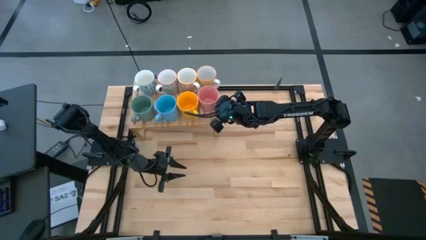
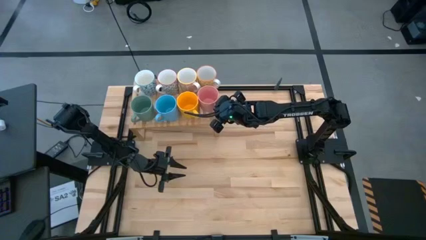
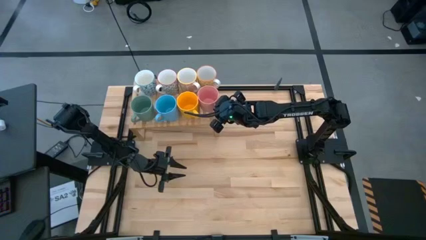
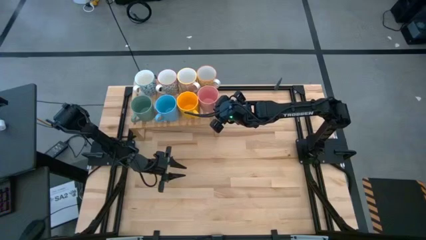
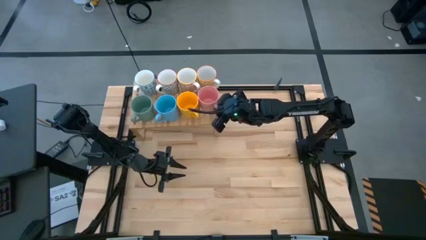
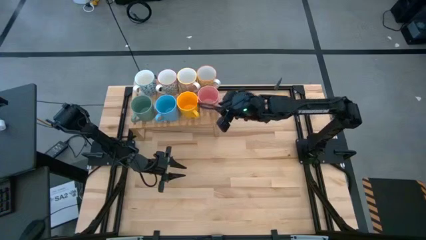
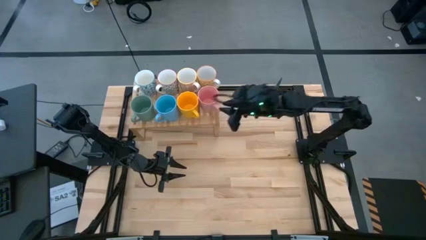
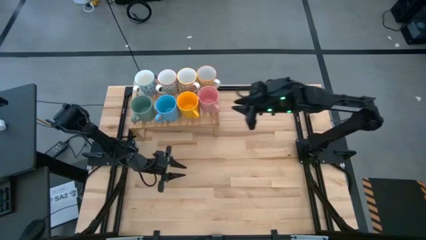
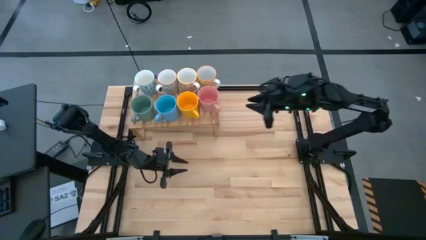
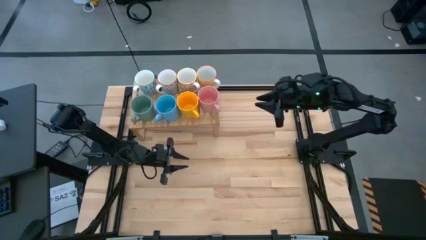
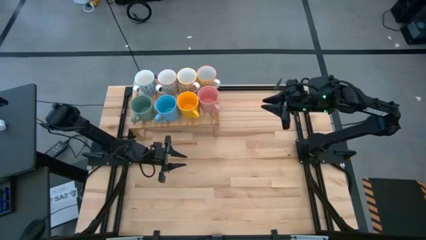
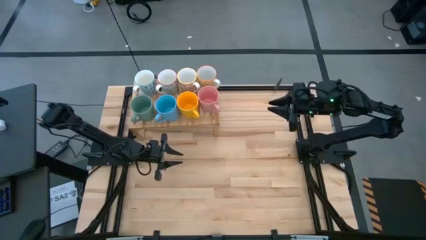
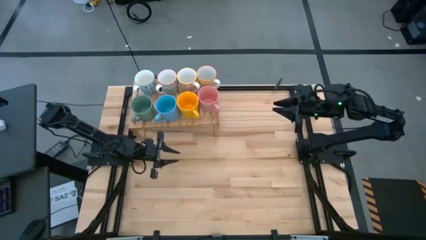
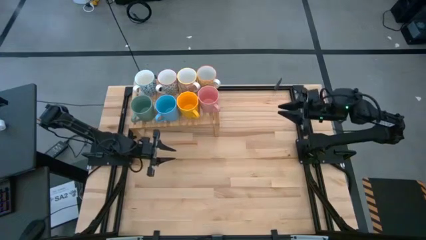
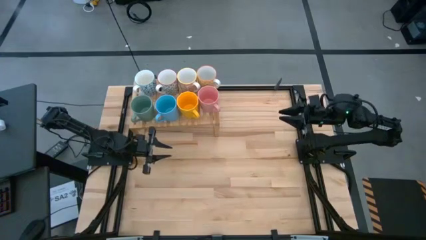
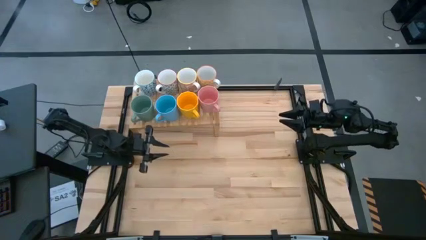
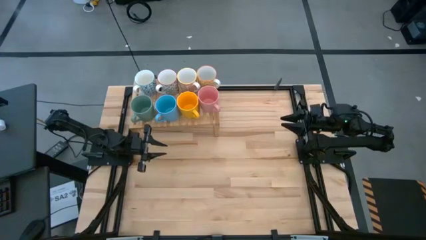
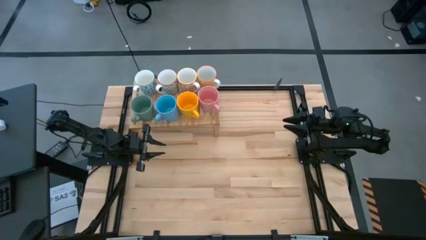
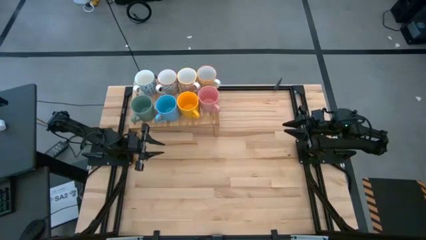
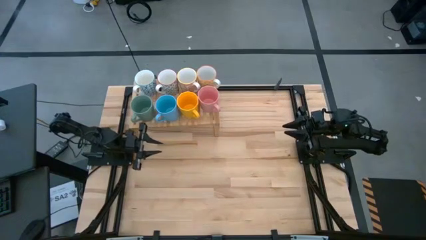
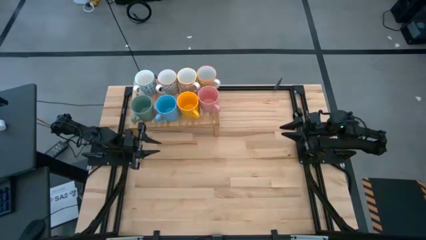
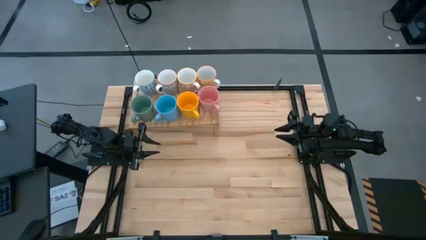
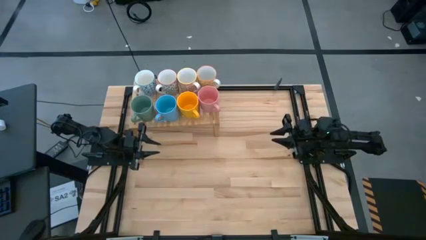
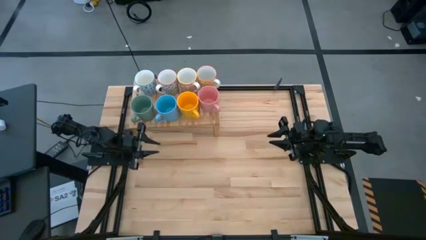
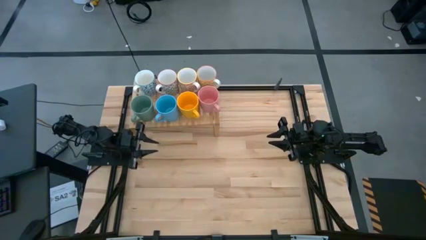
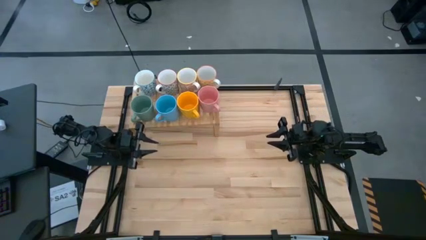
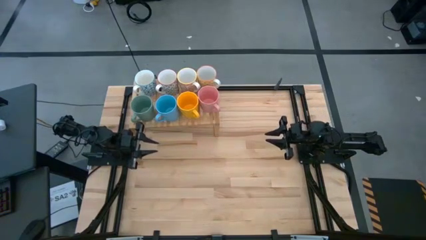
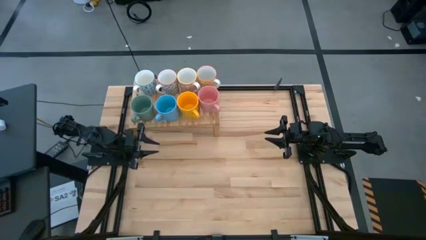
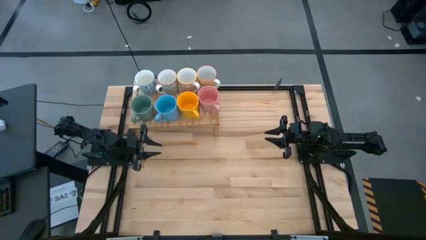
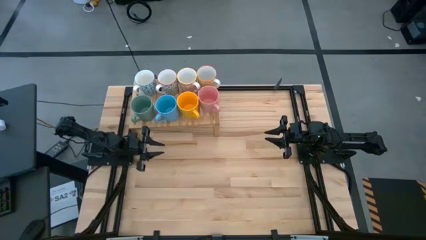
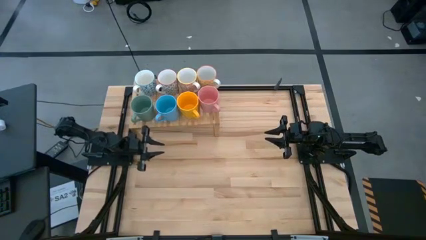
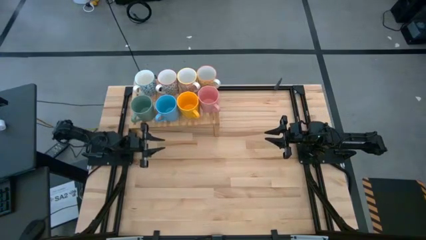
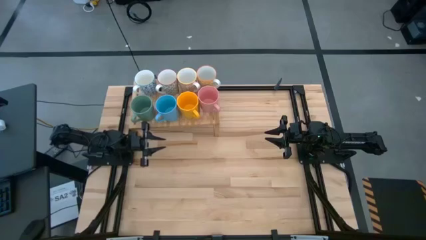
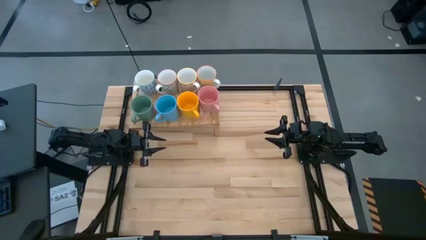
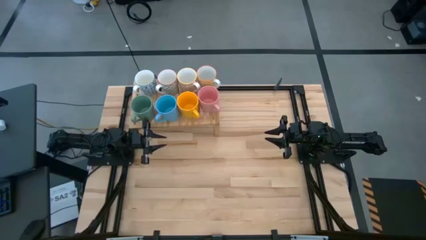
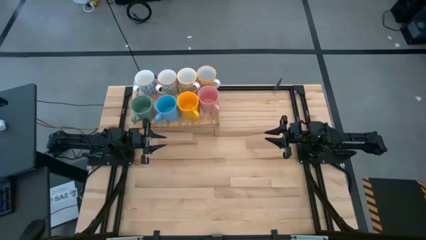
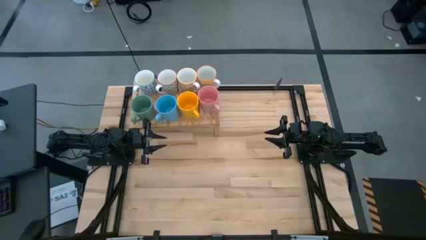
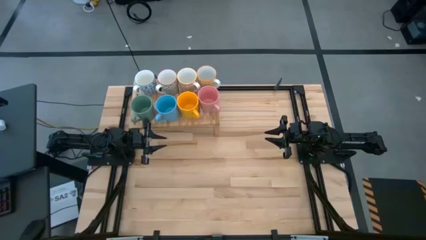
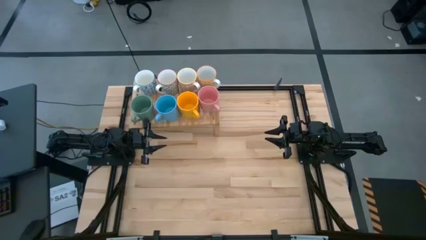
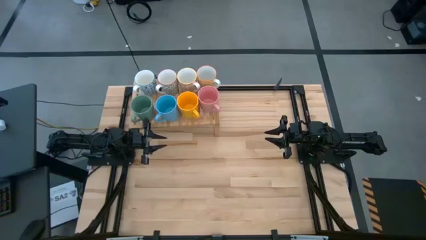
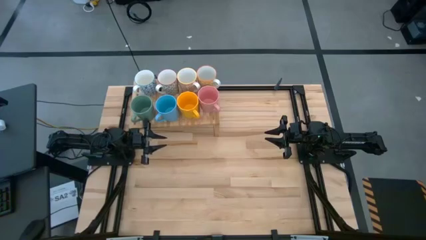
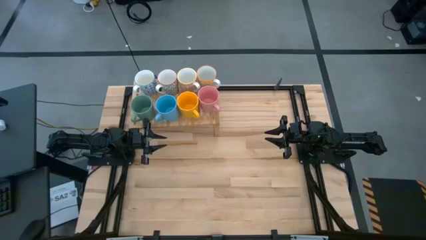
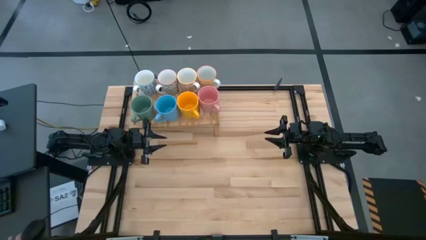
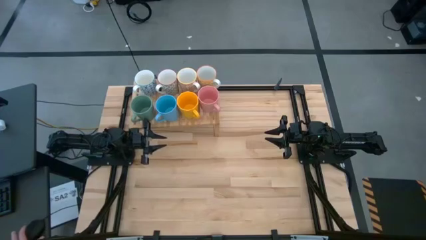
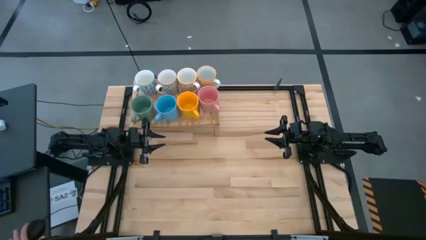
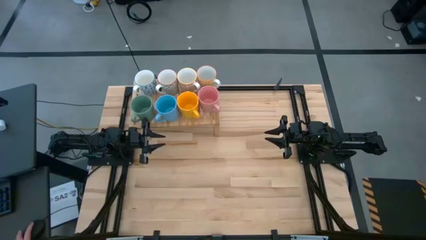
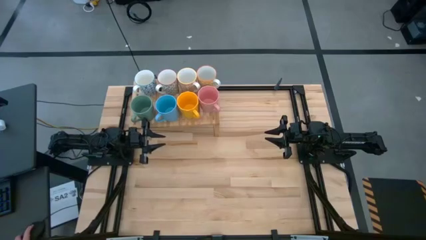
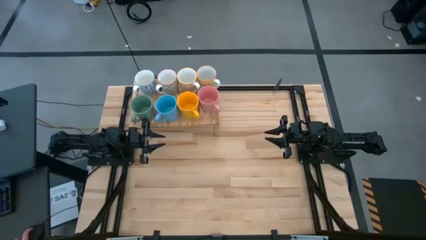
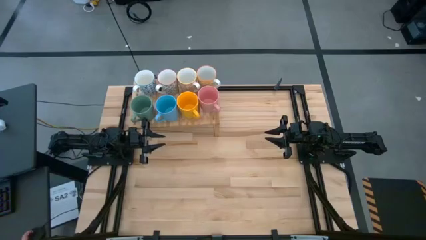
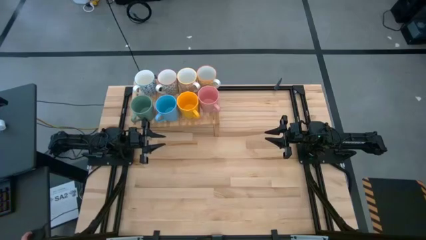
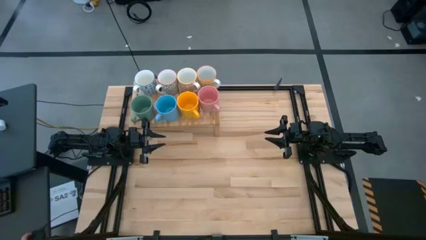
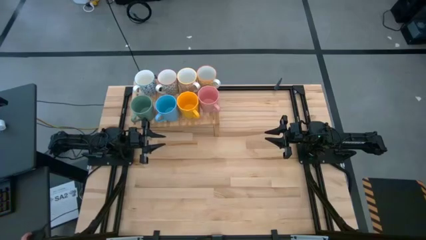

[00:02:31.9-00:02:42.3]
Task: Place coffee mugs
Return to Home Position

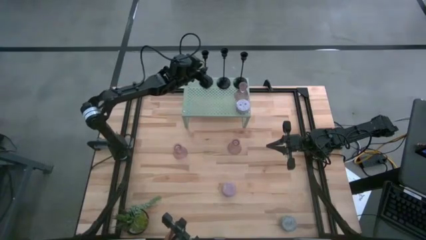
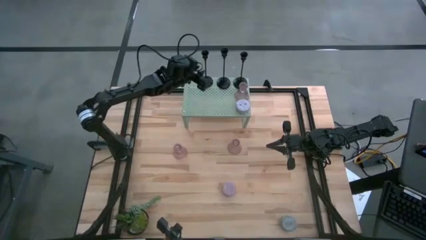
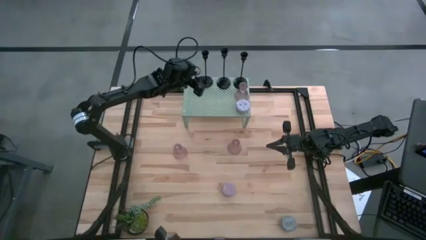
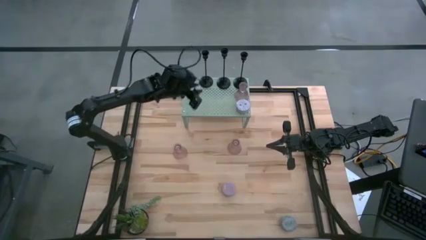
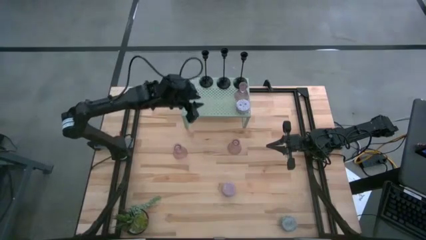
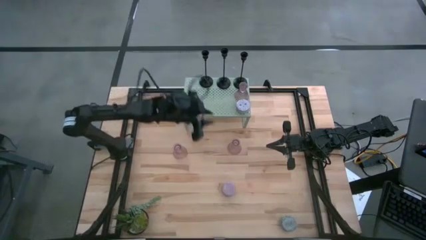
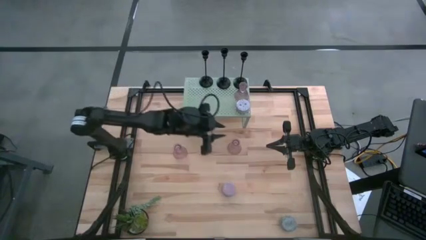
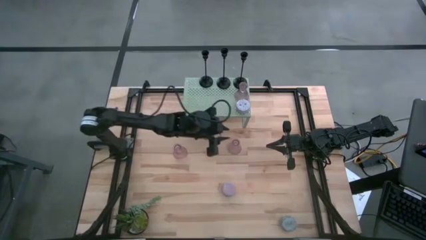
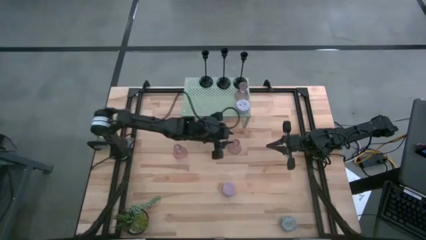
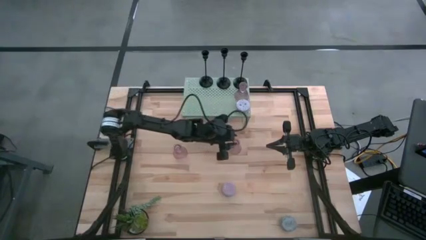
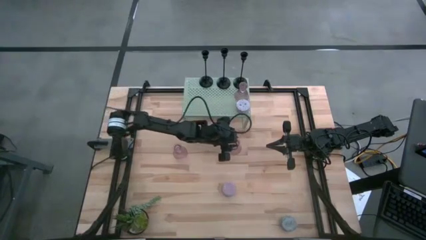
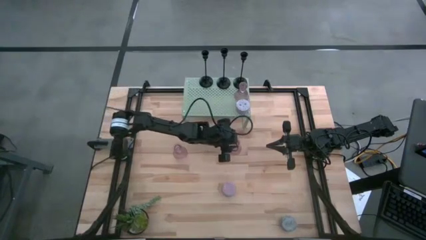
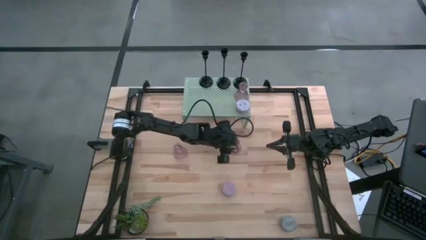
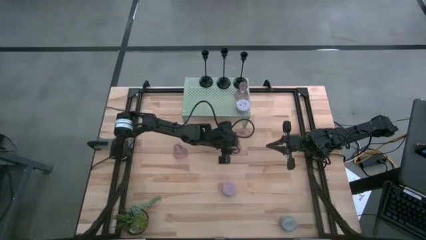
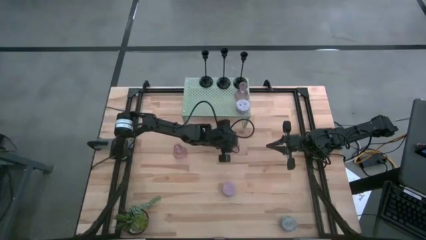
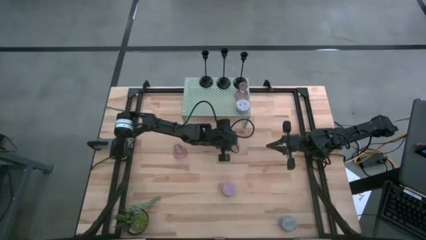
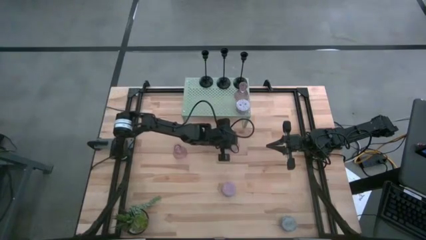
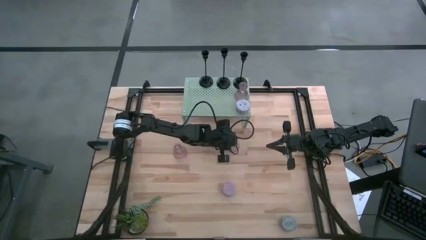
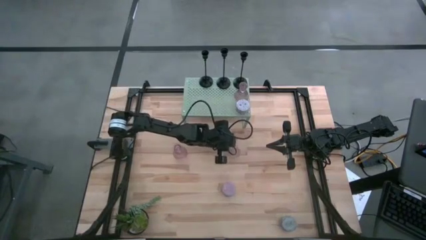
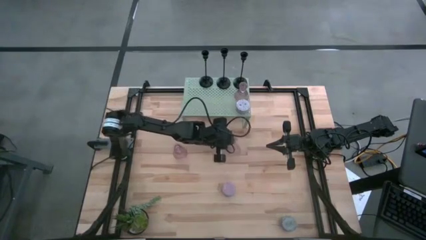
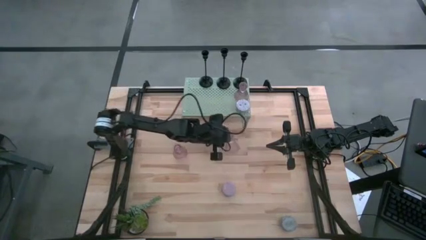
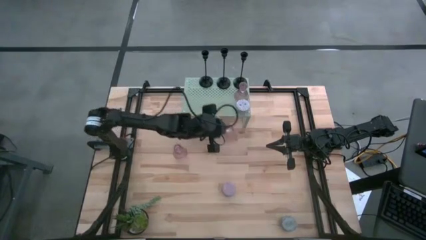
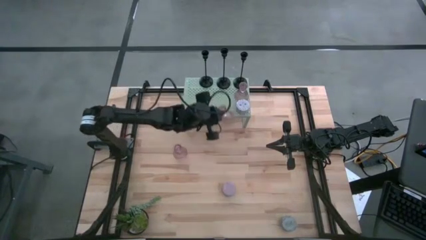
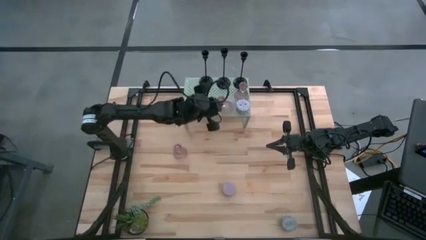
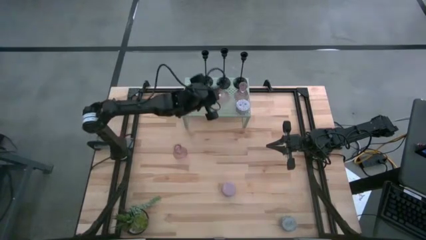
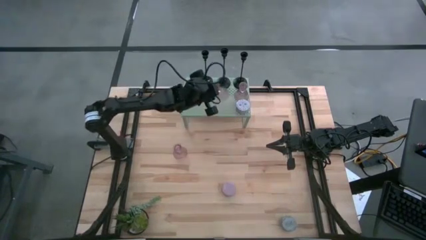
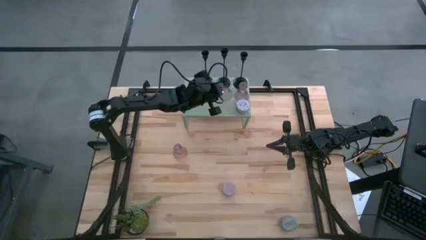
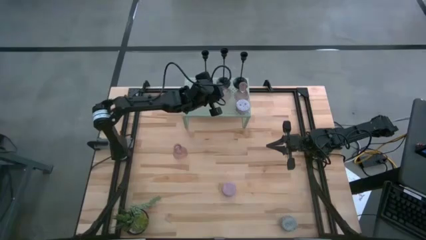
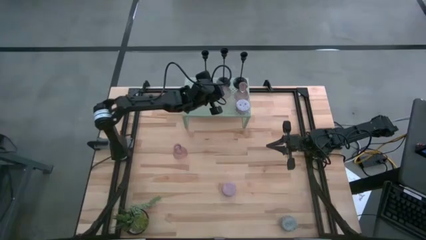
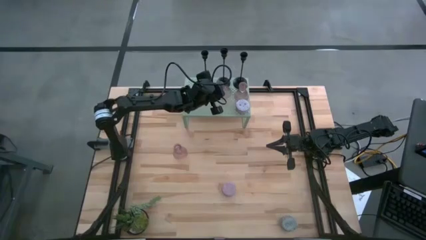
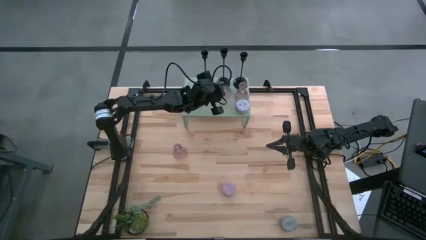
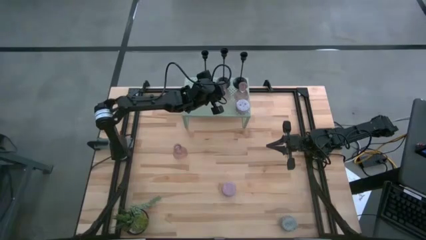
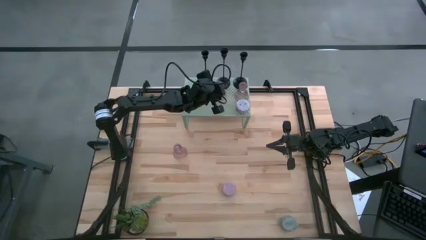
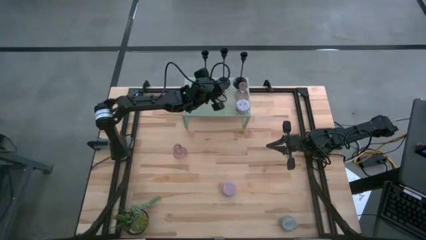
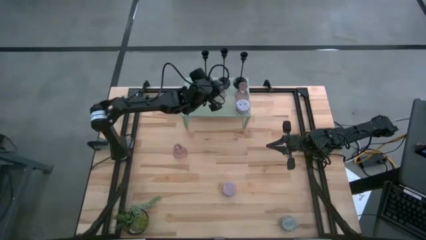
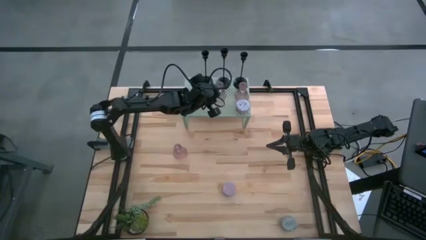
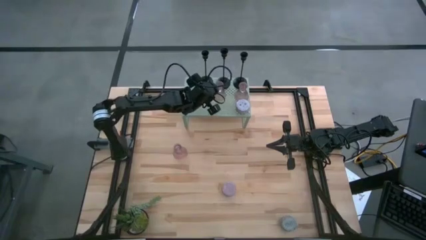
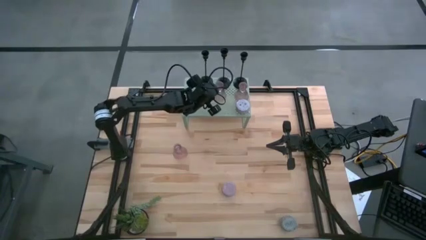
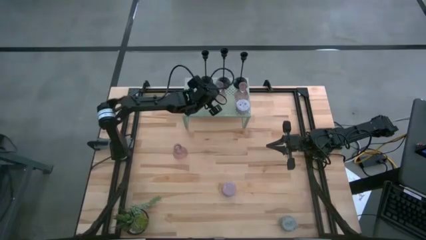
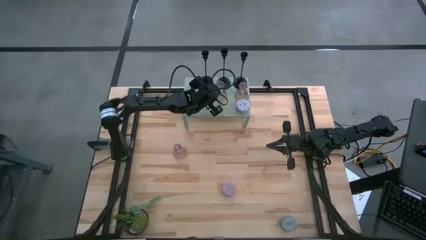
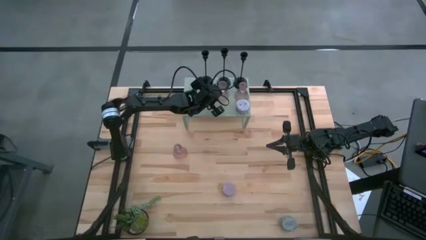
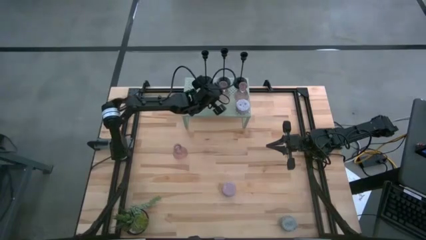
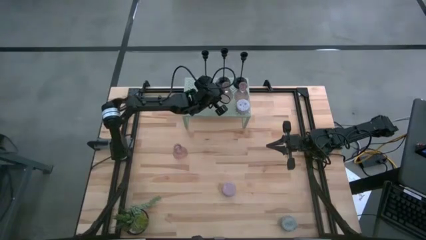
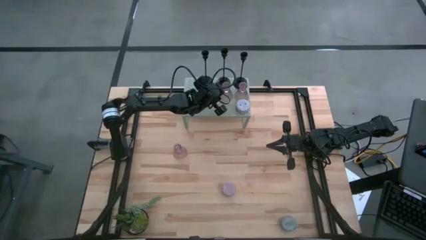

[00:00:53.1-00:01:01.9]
Task: Pick & Place candle stick holders
Put the right pink glass candle holder on the shelf
